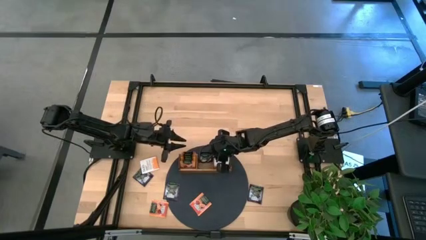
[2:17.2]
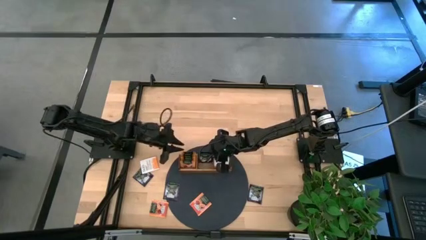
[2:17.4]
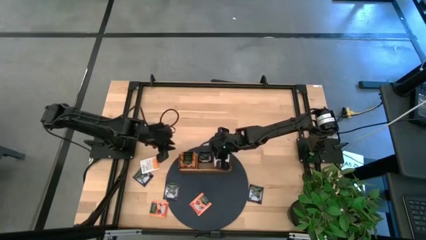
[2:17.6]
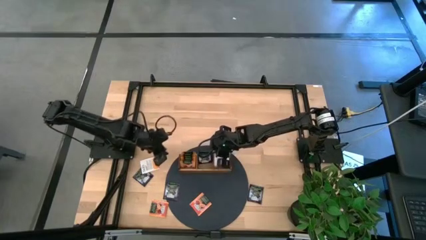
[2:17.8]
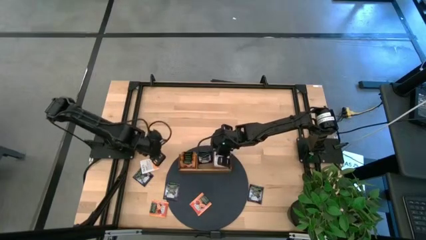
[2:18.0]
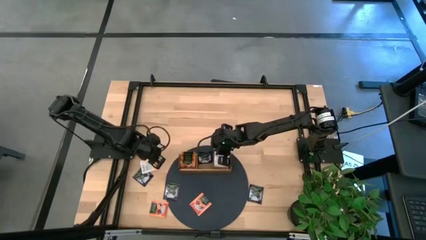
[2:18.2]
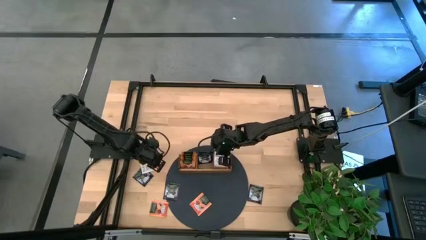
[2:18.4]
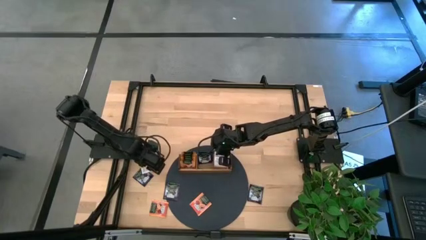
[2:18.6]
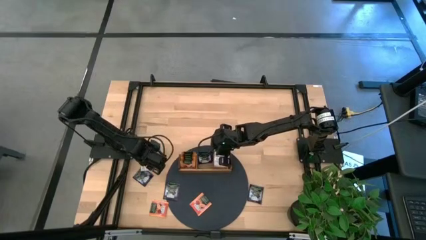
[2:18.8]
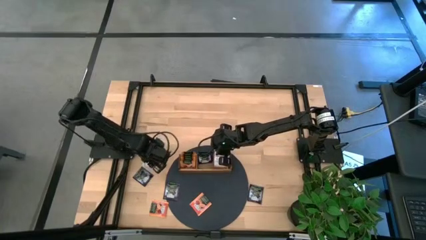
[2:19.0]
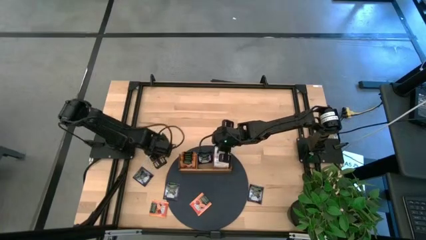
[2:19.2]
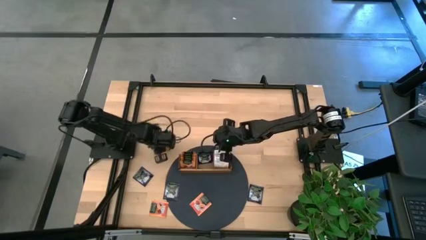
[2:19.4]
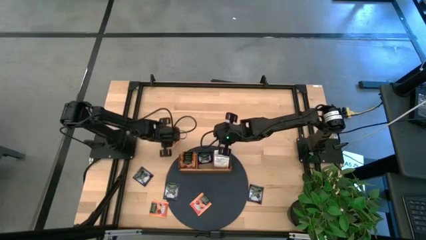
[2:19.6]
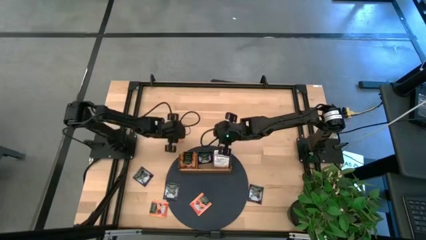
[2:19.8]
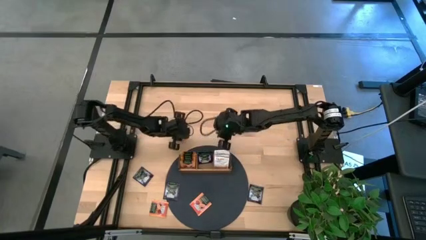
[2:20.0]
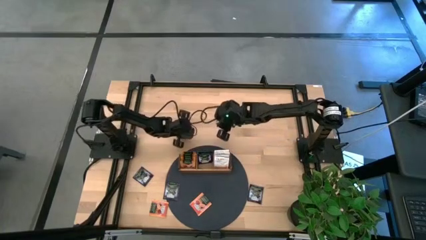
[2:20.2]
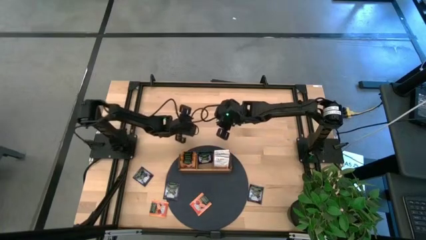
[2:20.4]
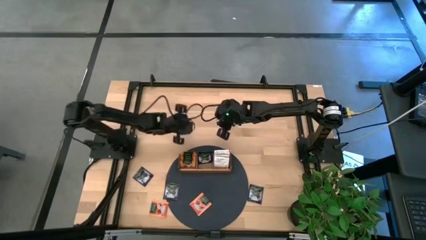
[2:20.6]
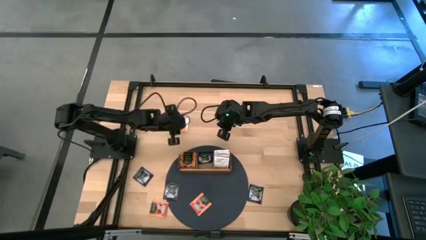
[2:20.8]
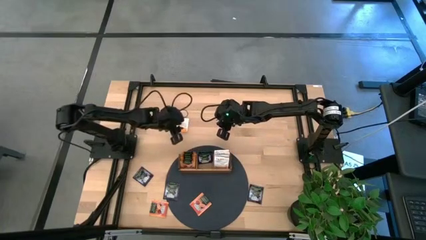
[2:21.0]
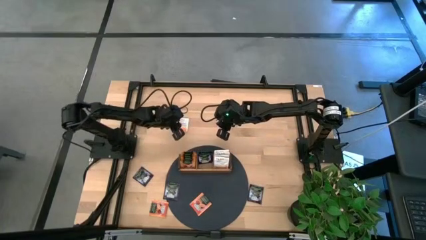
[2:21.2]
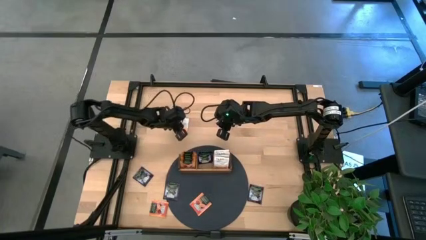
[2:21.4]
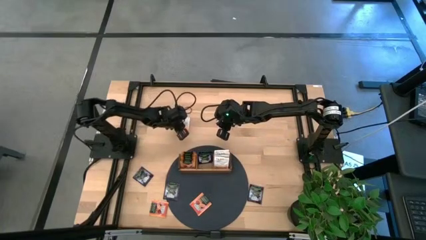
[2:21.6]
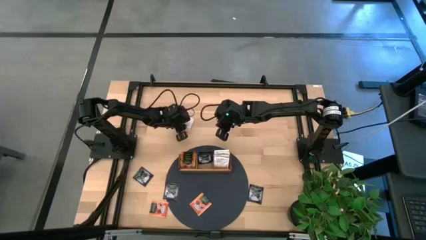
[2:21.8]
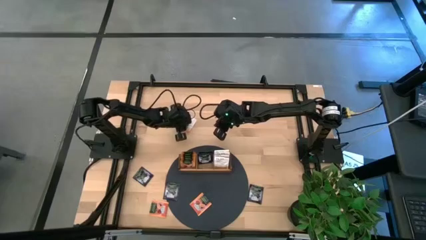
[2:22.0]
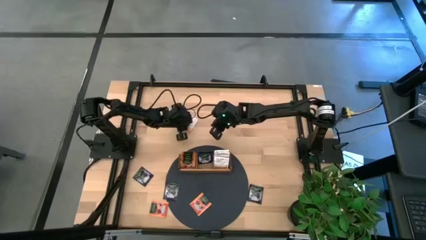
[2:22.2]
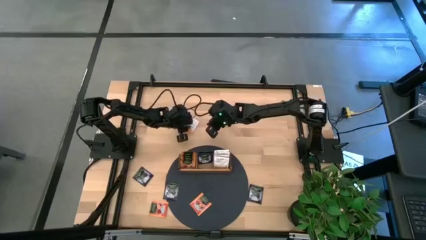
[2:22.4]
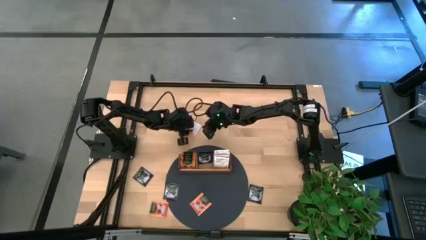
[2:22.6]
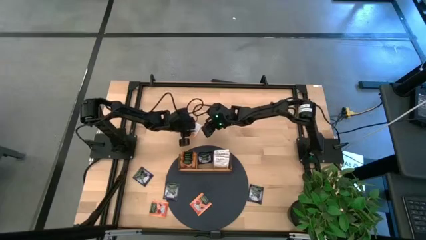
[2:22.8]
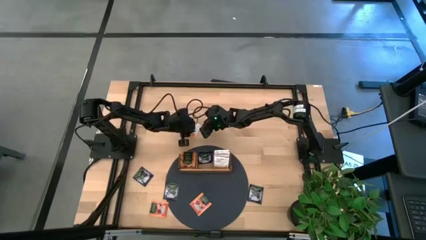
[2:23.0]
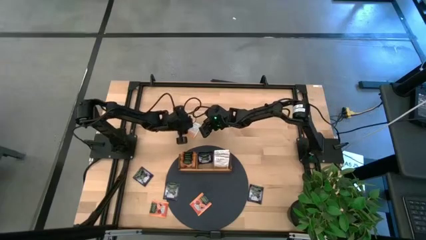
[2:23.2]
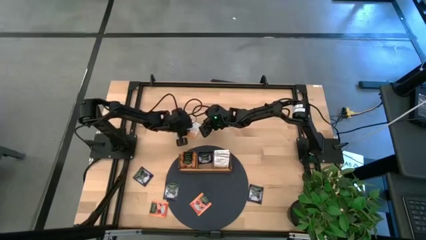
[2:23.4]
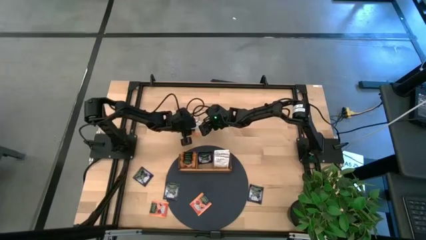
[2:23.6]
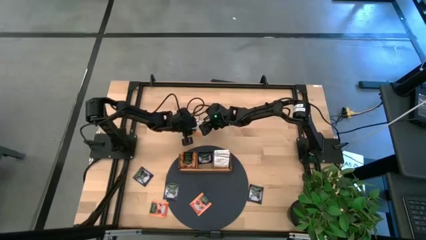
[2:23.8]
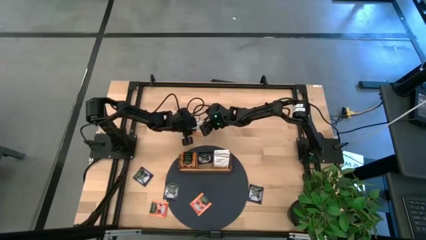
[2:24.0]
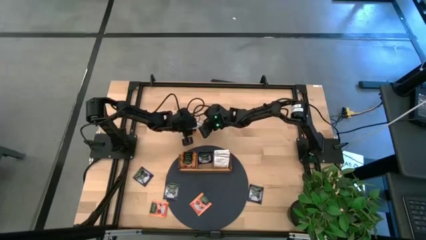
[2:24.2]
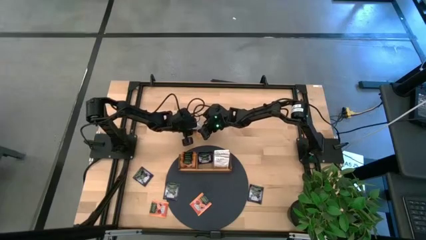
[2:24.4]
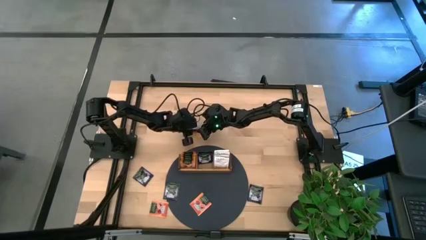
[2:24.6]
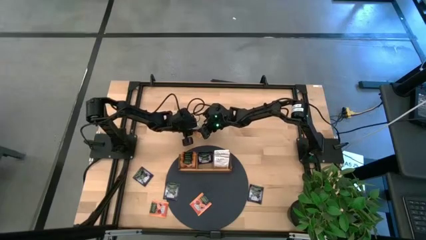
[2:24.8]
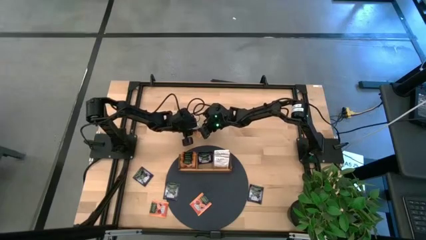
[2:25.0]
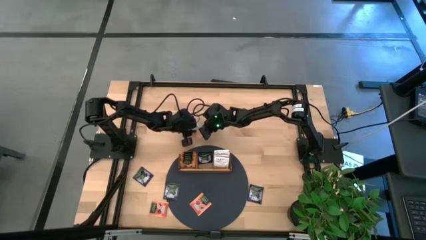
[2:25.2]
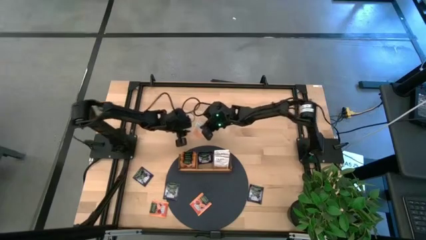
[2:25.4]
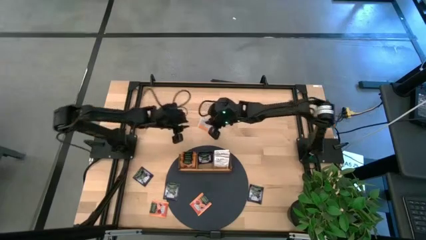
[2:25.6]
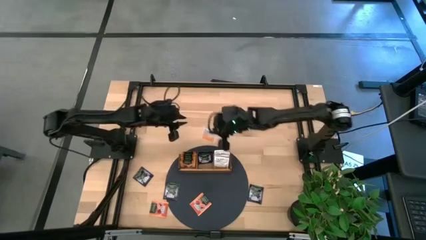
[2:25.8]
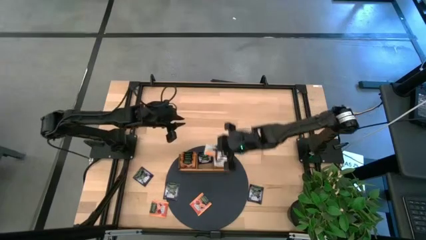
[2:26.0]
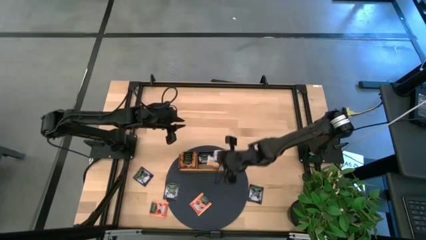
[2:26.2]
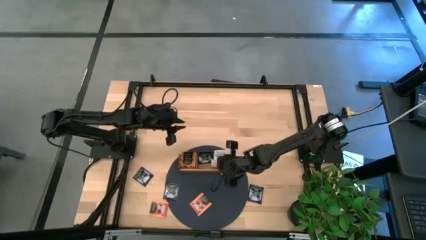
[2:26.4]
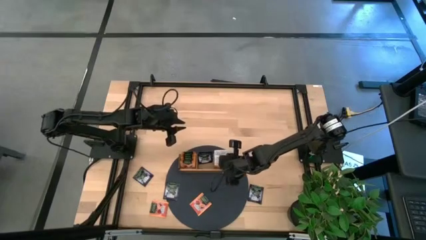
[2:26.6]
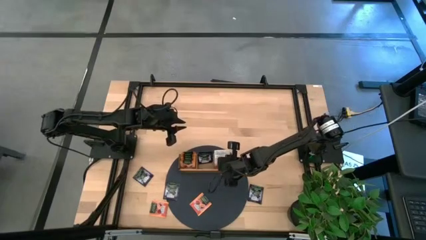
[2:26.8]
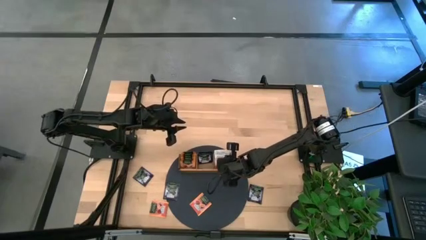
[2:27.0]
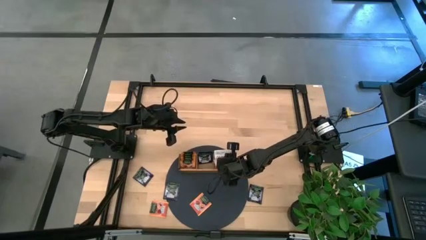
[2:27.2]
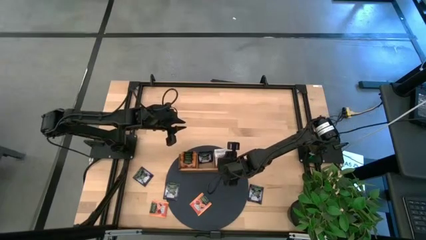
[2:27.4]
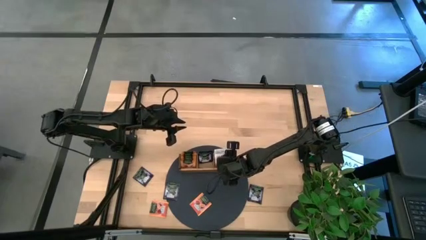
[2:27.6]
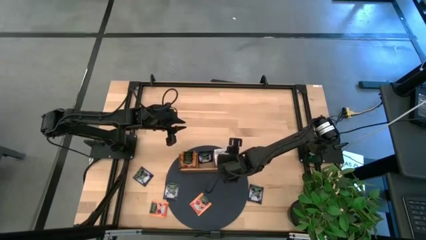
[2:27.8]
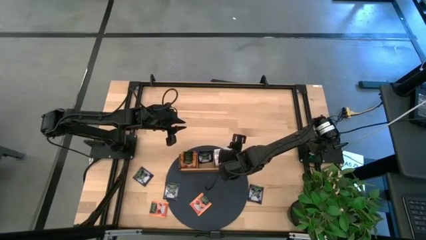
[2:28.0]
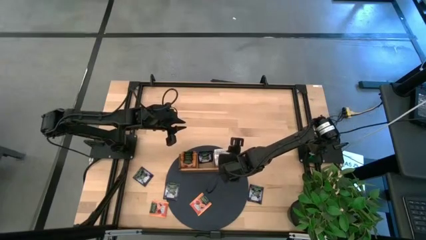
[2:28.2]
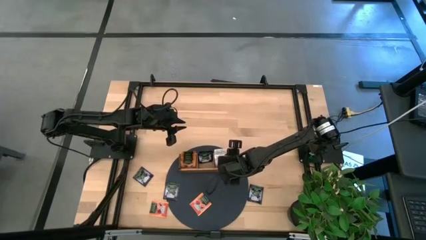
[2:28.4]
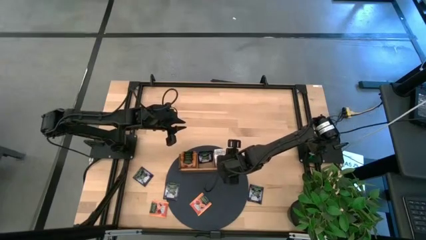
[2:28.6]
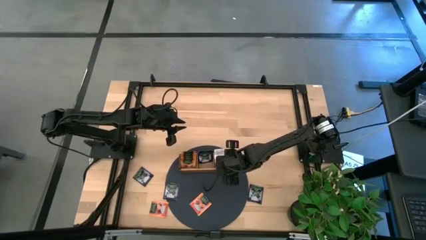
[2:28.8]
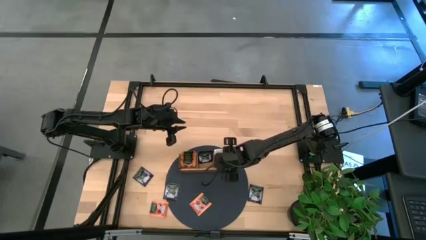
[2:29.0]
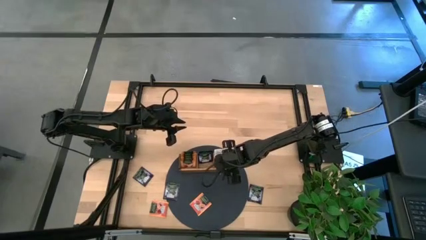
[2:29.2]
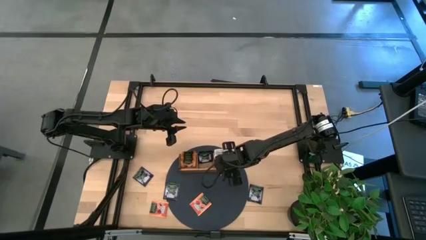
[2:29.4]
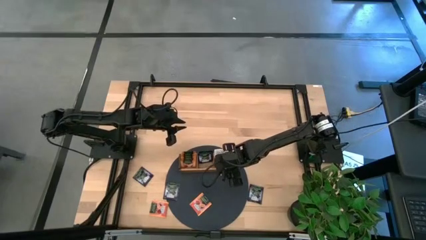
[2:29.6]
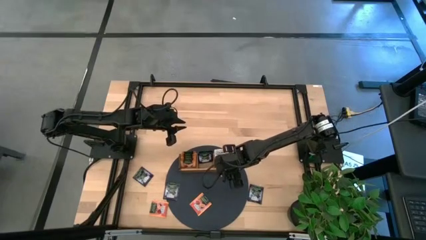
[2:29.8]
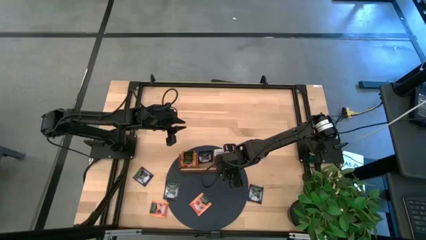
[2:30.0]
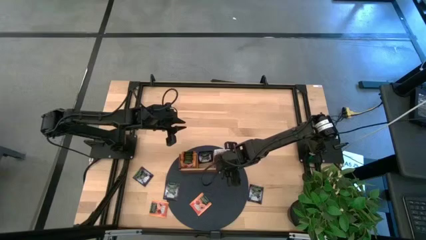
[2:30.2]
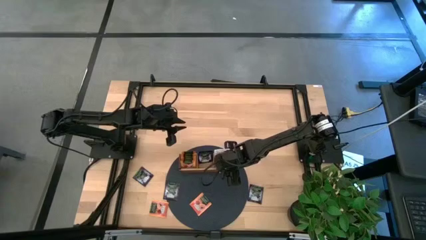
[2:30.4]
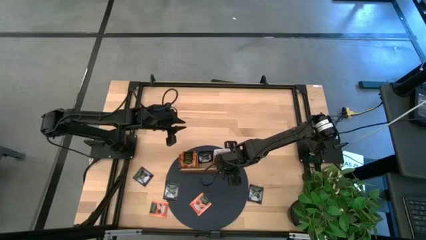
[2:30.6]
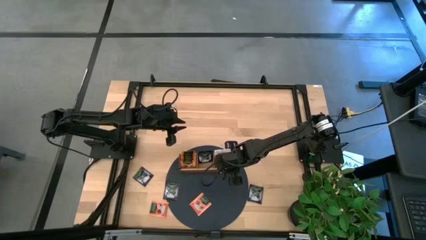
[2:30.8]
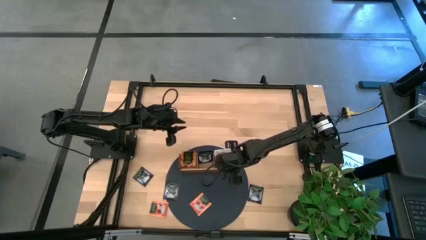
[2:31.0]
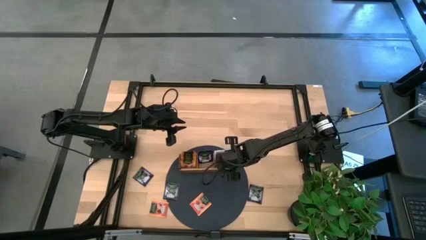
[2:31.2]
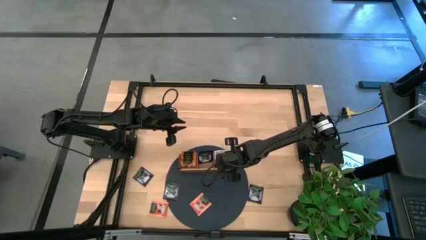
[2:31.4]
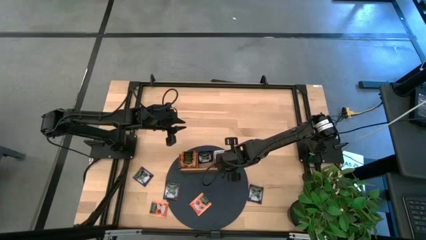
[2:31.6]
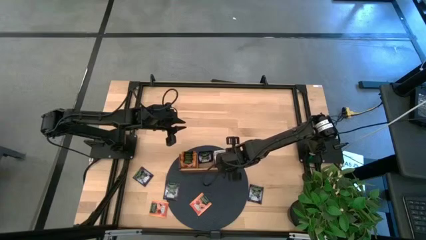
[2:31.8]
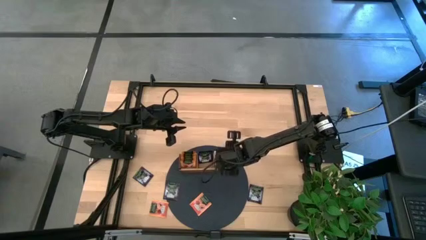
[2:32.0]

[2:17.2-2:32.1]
Task: Pick & Place Tea
Put the white tea bag into the right section of the wooden organizer

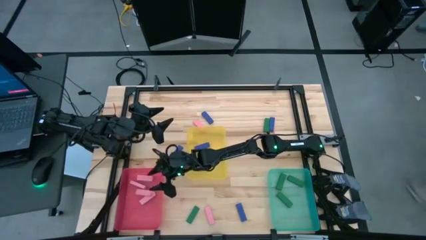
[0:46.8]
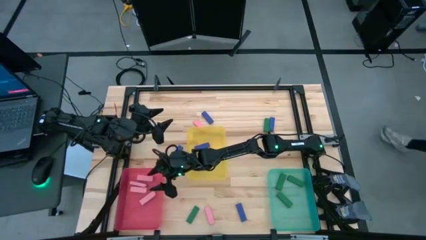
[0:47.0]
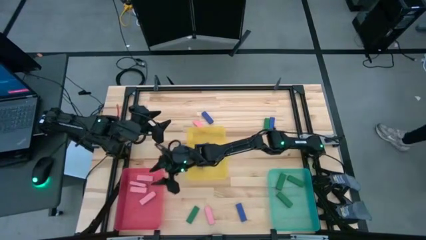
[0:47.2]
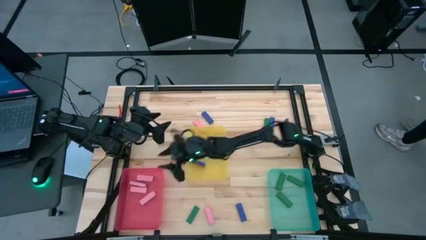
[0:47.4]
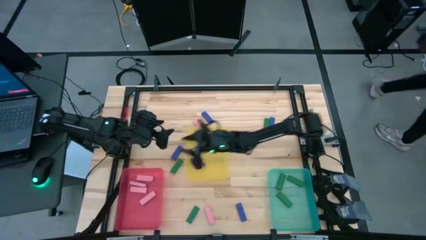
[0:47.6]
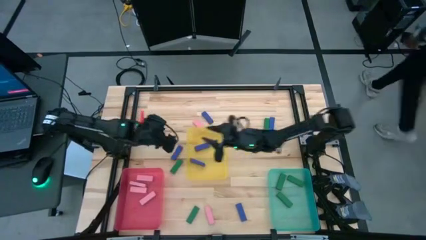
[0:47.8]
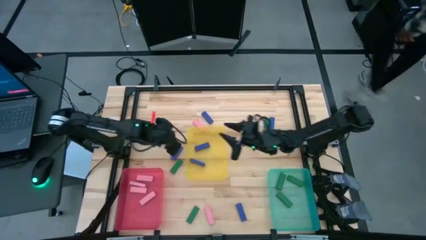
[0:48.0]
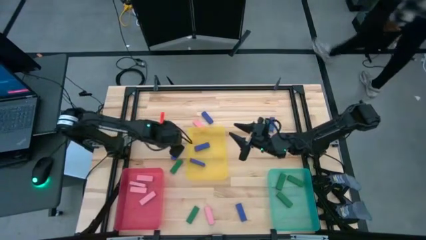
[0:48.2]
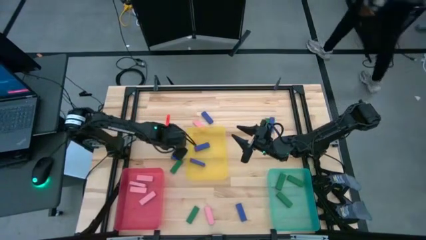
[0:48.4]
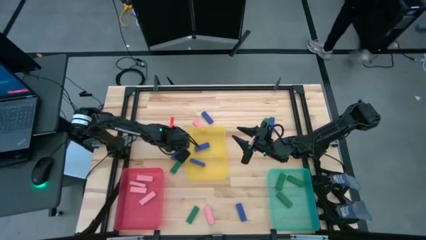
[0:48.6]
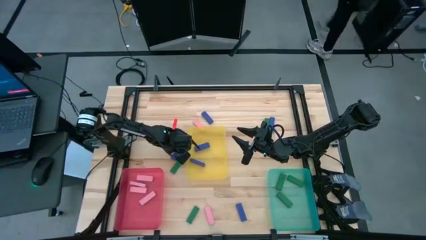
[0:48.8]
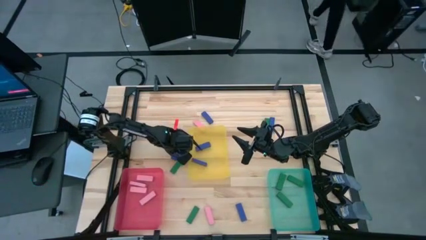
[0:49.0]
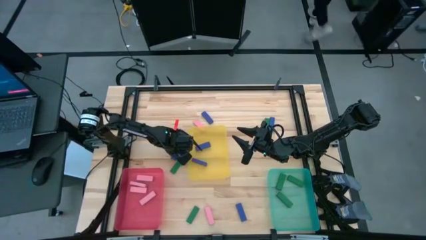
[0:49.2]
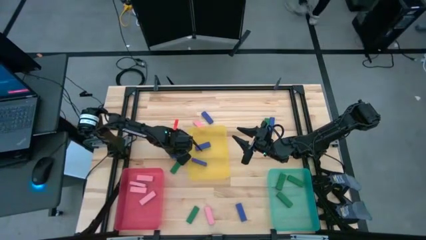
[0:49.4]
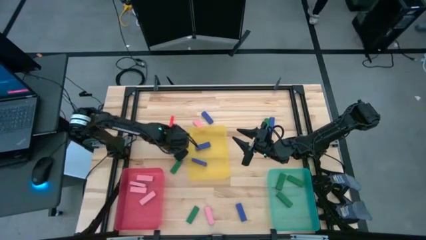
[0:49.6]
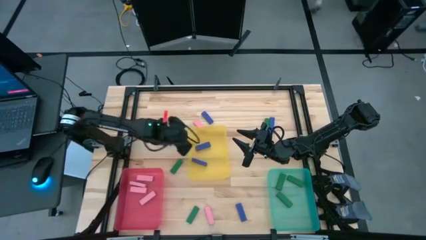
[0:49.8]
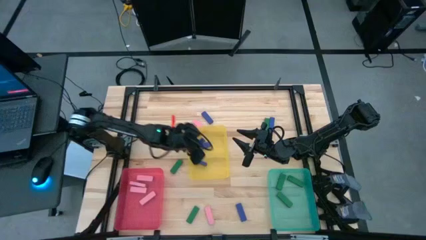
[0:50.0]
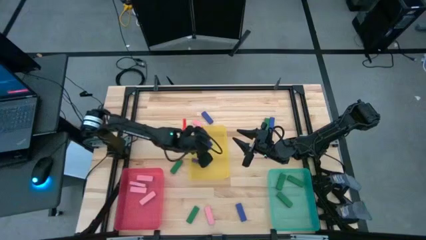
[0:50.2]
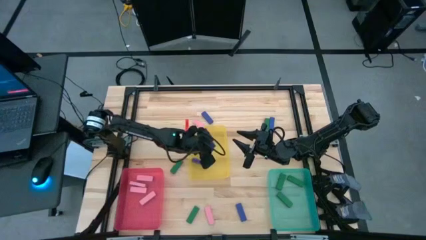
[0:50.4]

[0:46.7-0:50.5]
Task: Sort blocks
Put the blue block into the yellow bin
